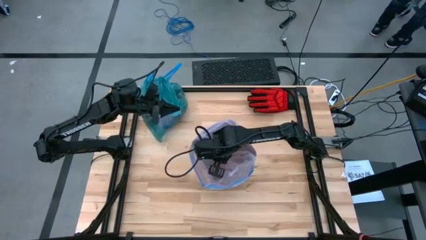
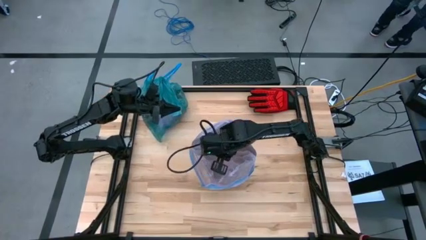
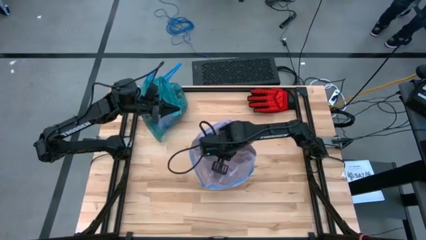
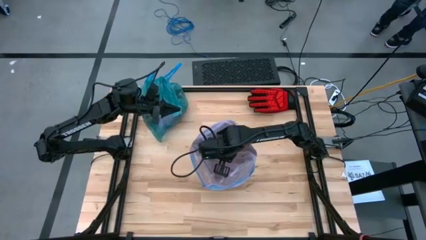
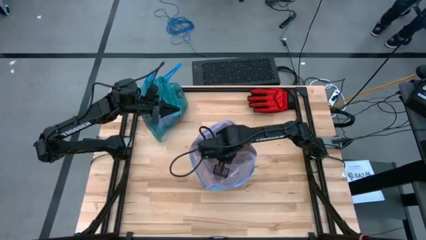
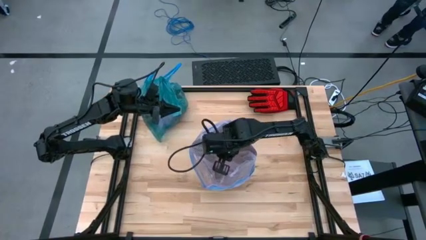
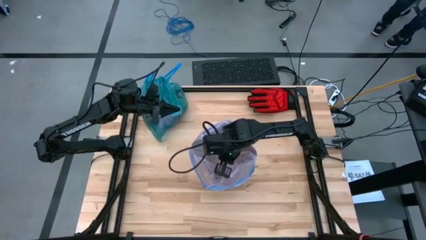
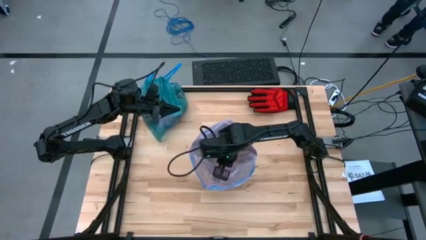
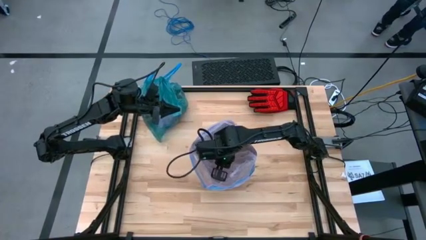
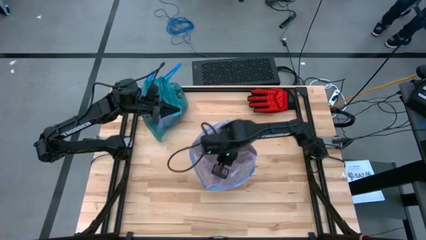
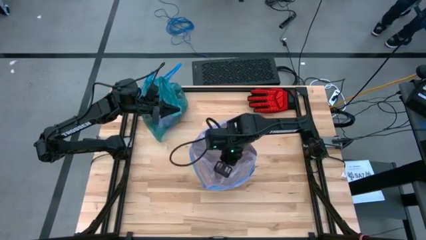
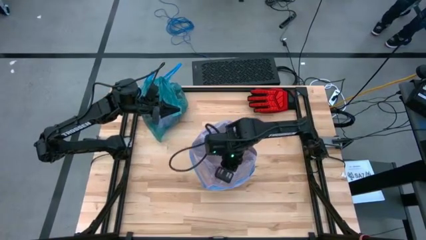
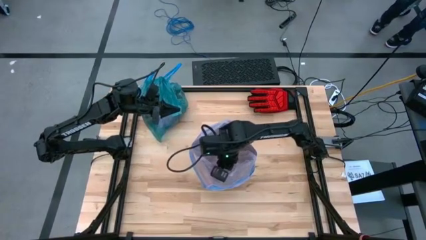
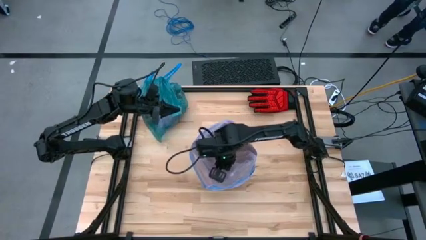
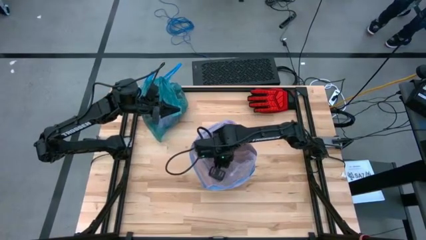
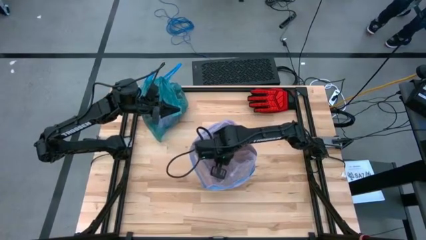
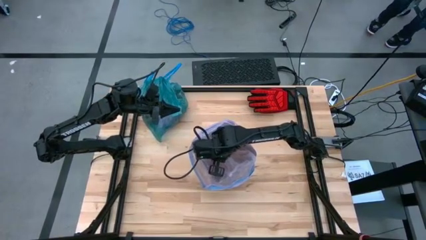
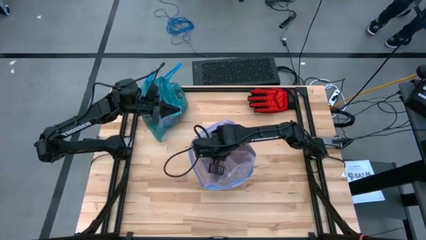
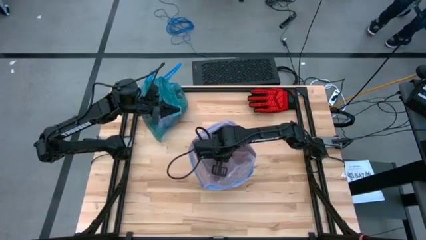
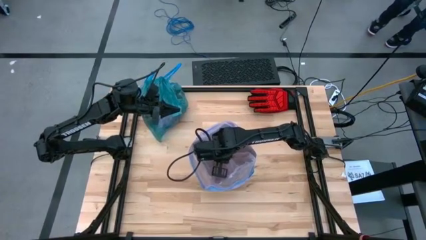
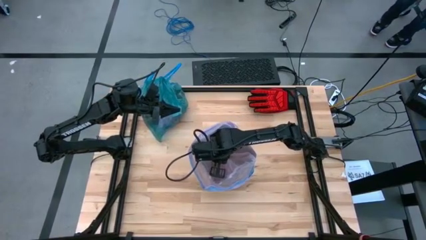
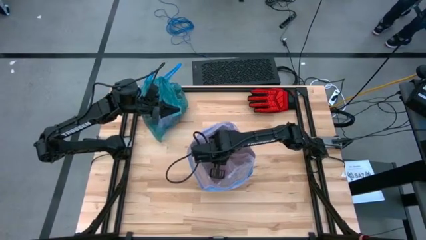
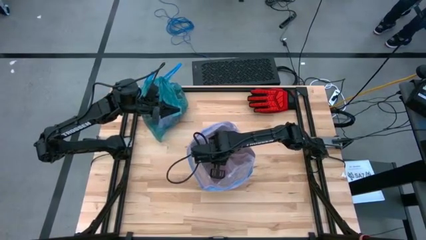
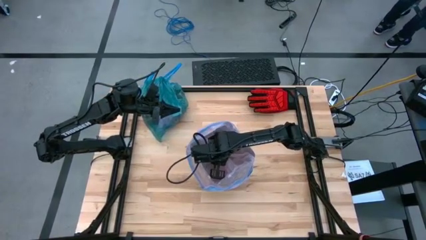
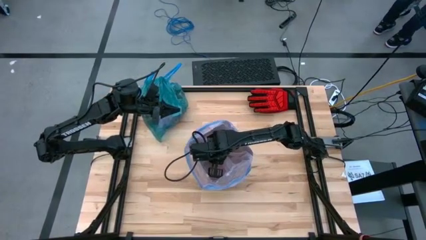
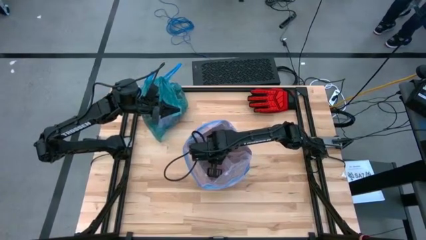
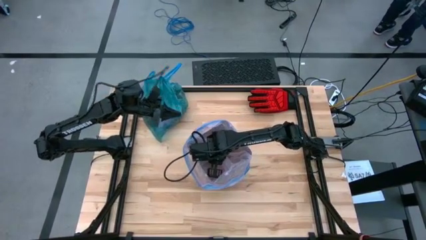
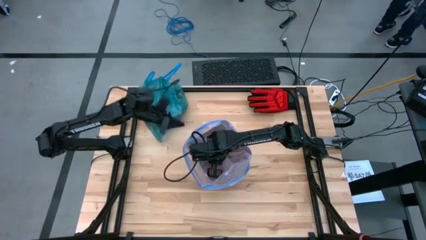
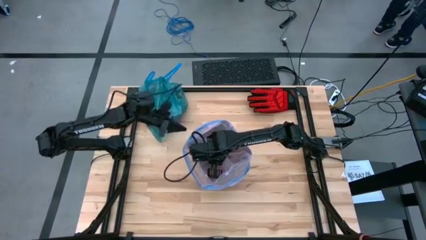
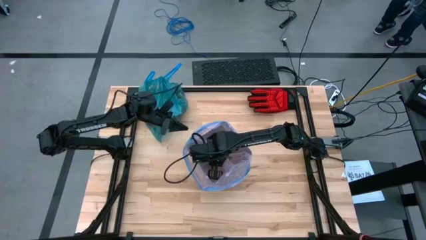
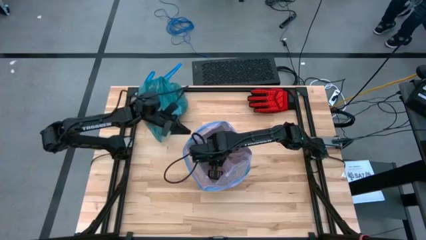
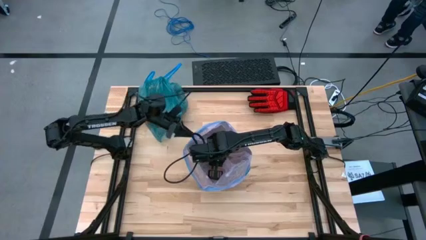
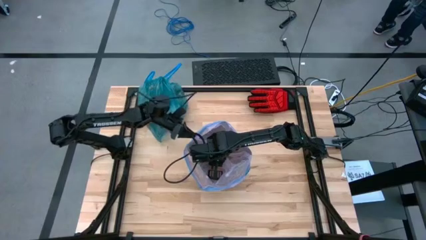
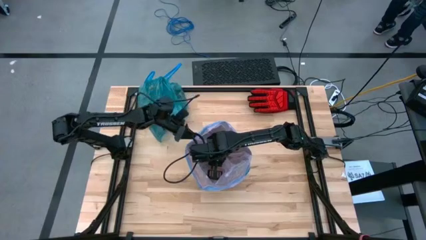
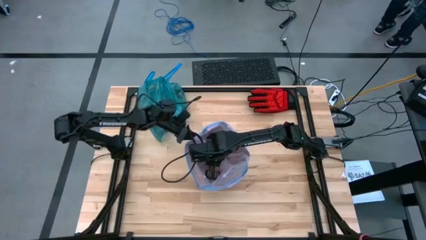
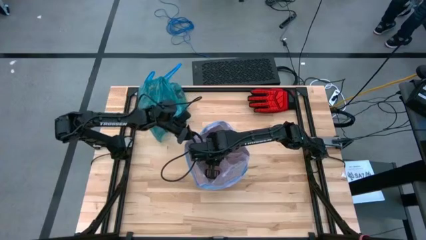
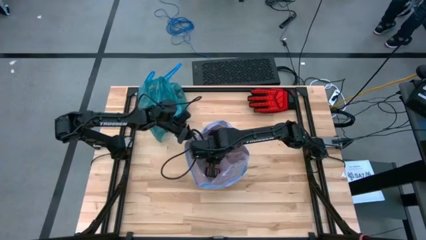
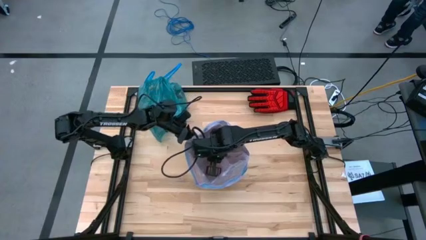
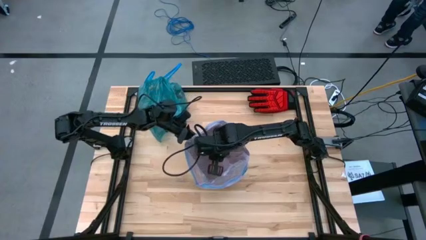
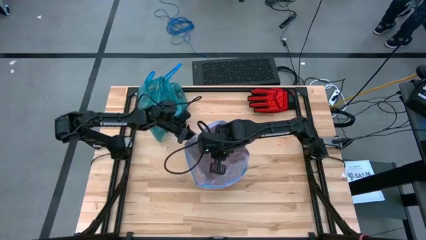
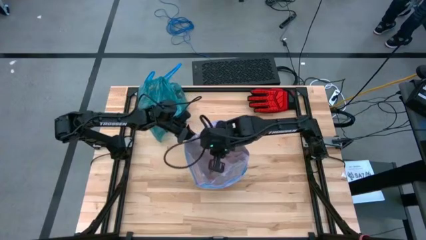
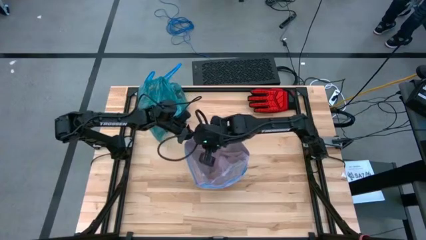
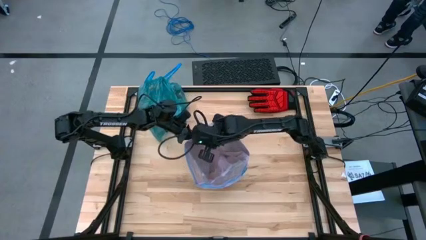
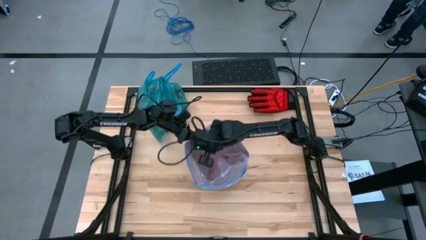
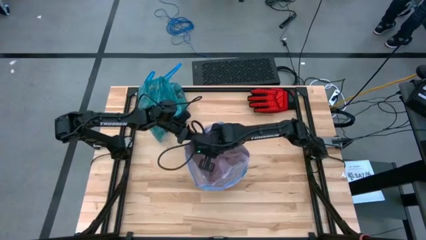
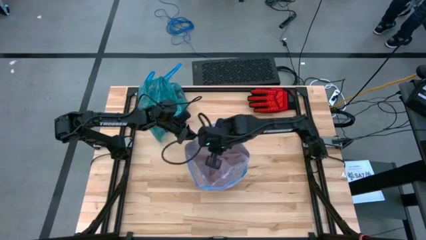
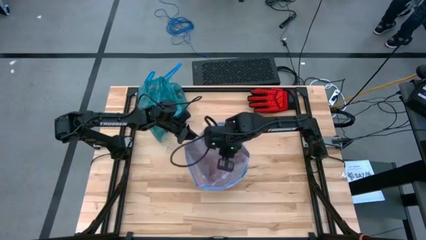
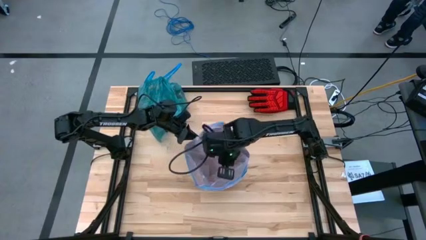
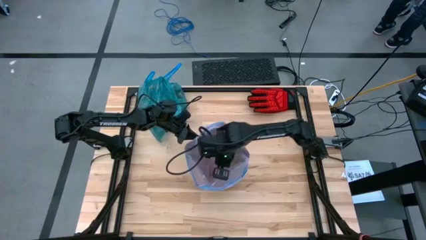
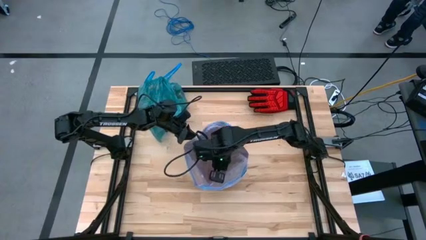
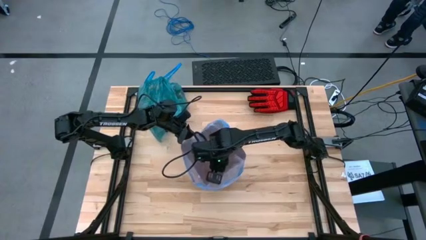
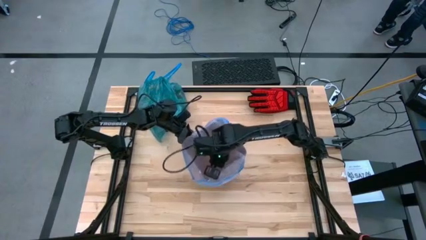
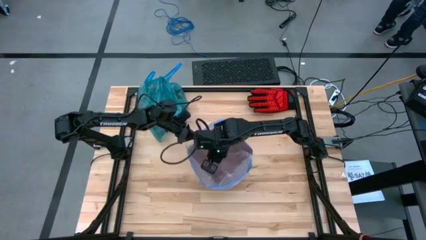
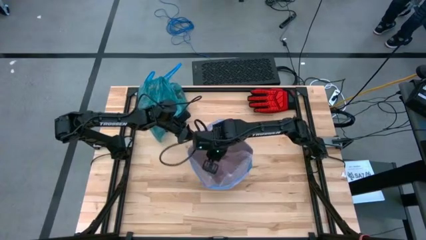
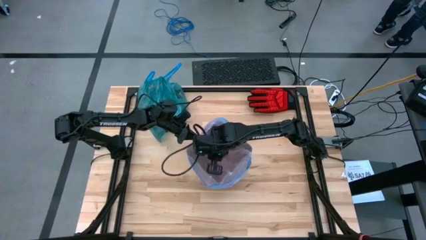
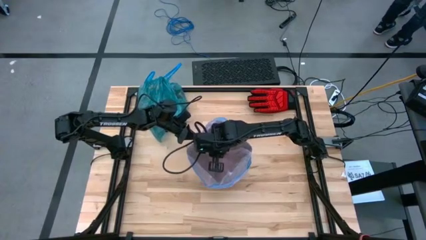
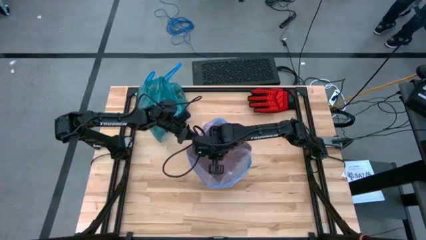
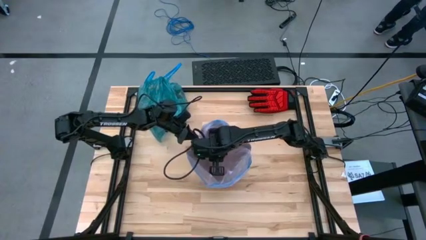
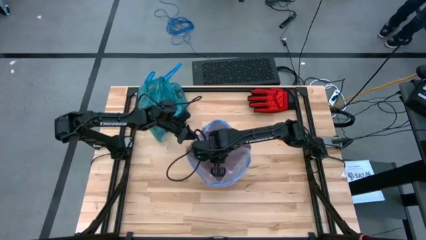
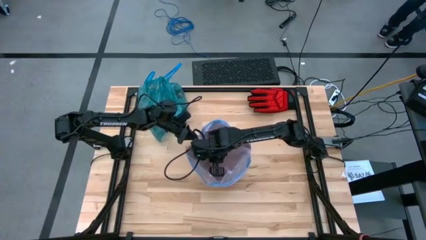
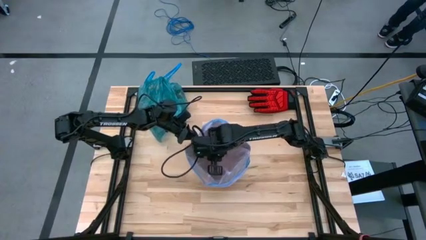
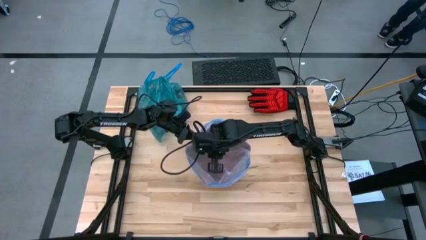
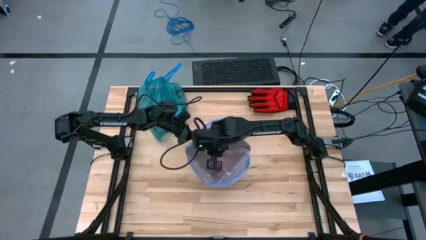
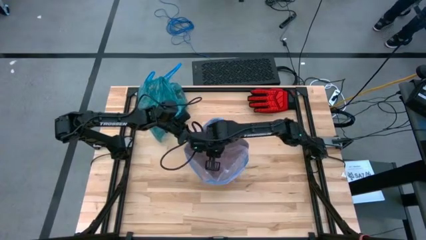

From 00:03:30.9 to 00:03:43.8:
Task: place trash/remove bag and relplace
Insert the new pink trash bag into the trash bin

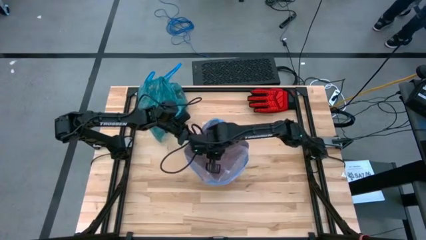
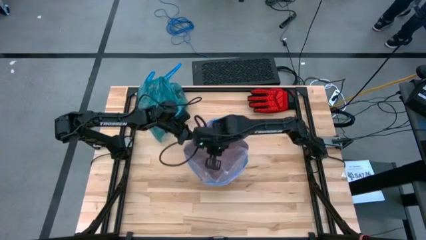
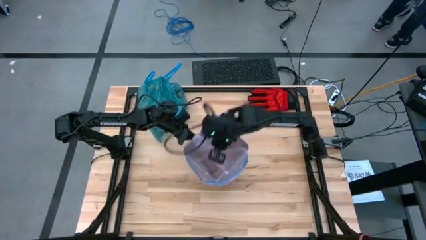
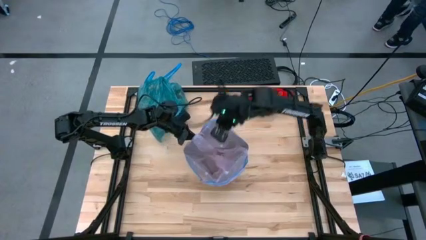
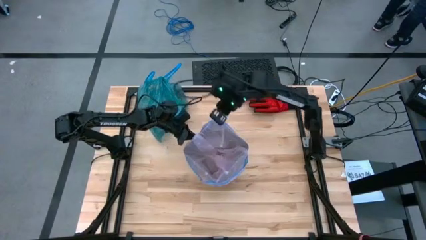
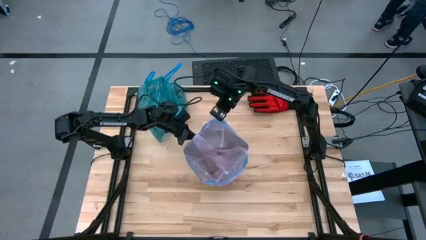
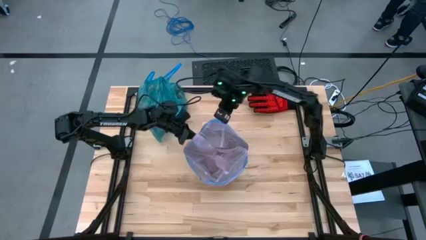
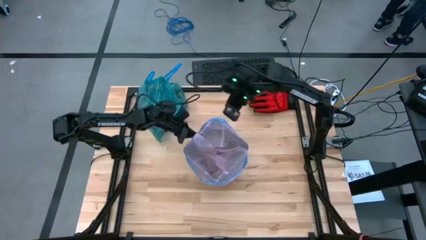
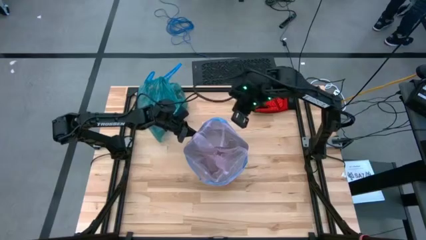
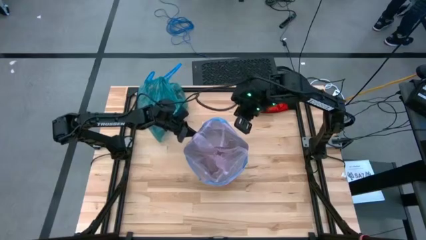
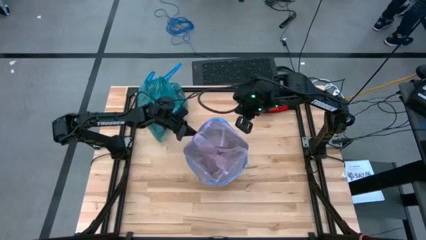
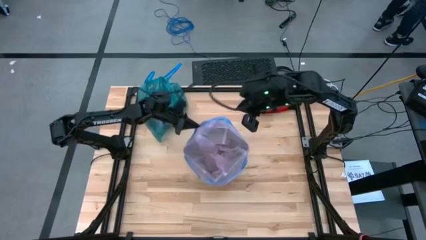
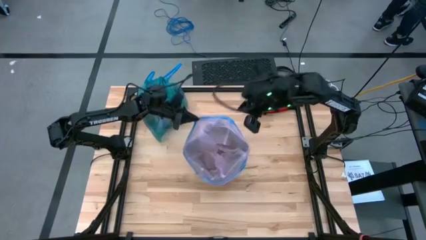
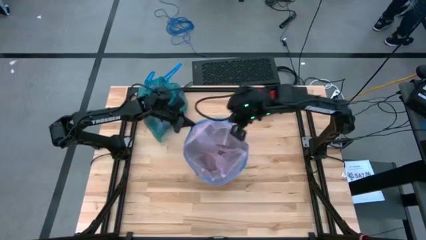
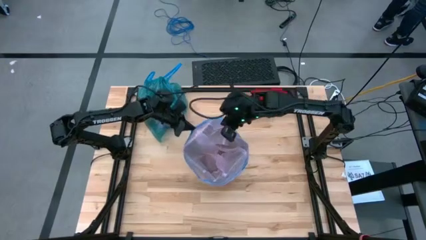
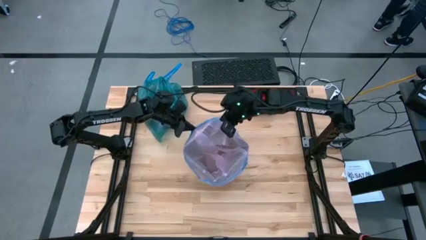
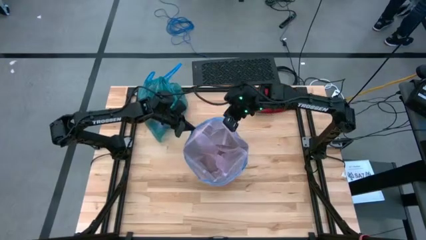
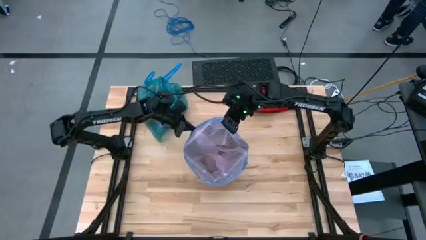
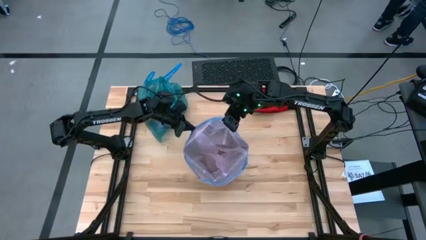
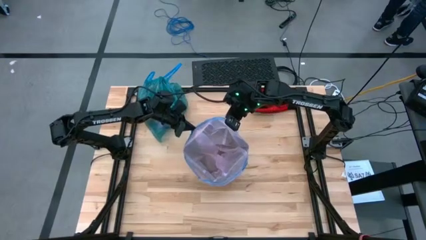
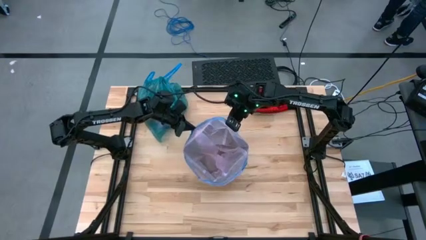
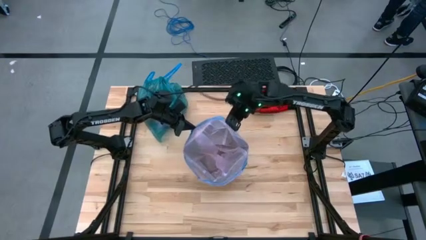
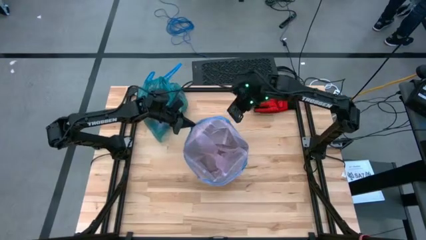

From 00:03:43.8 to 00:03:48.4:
Insert the new pink trash bag into the trash bin
